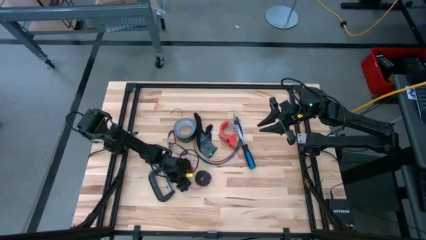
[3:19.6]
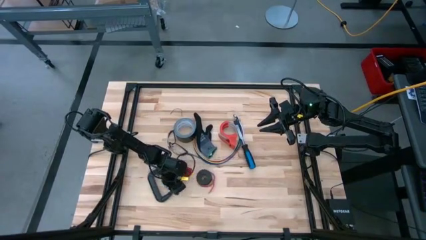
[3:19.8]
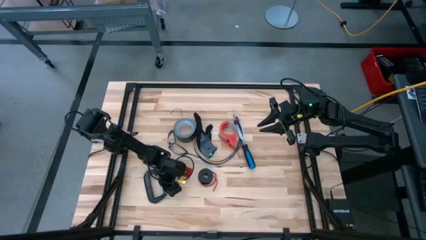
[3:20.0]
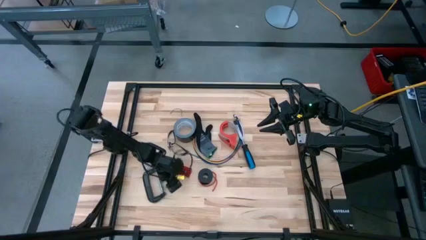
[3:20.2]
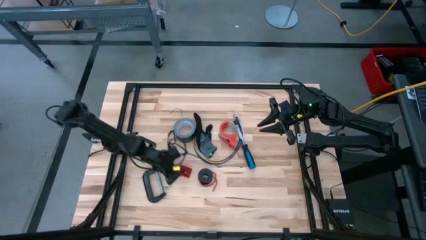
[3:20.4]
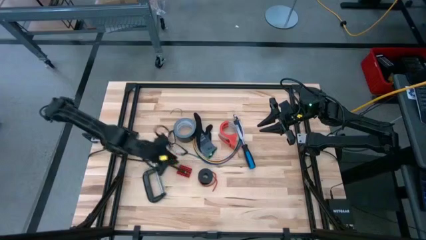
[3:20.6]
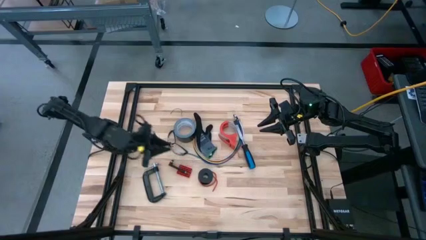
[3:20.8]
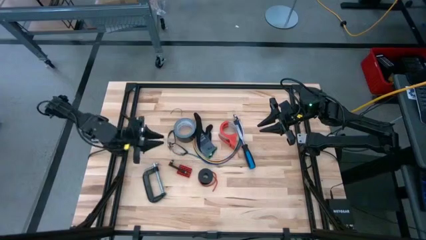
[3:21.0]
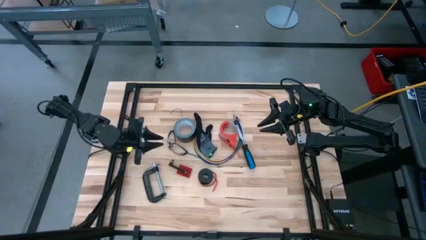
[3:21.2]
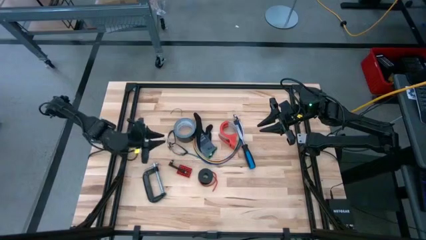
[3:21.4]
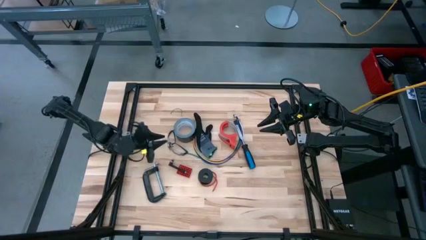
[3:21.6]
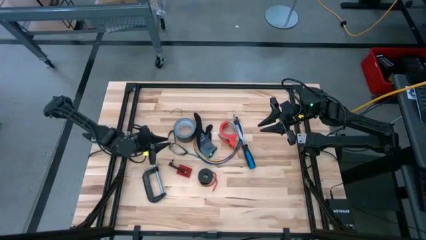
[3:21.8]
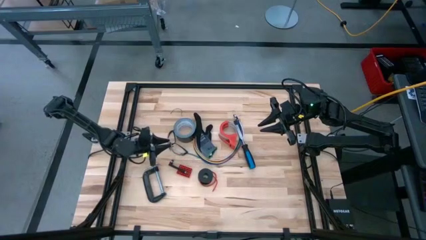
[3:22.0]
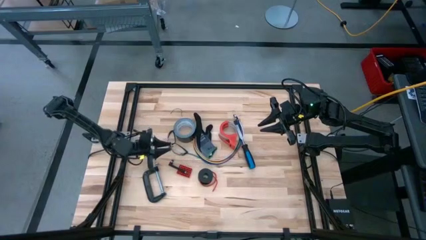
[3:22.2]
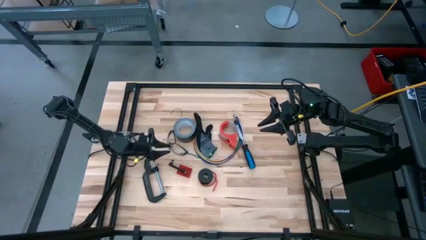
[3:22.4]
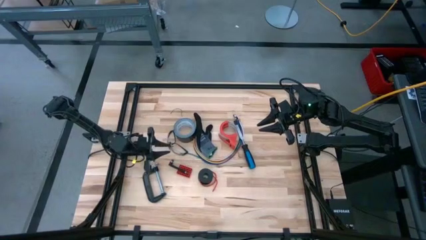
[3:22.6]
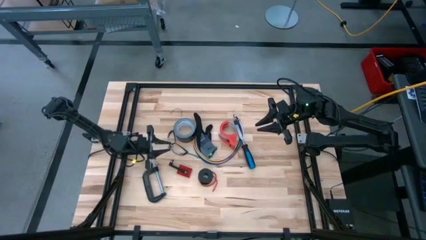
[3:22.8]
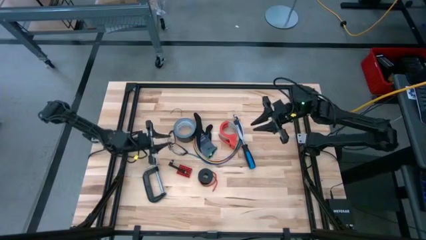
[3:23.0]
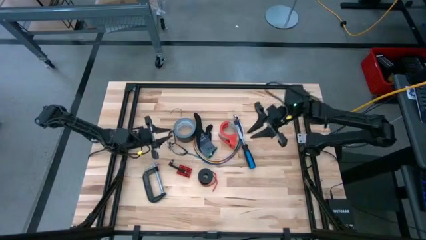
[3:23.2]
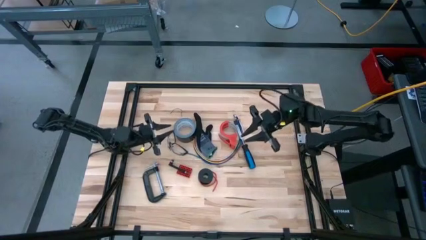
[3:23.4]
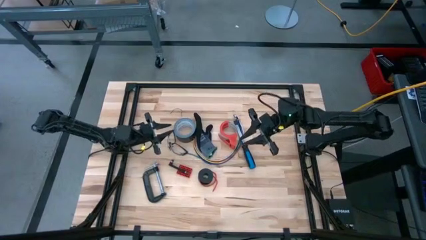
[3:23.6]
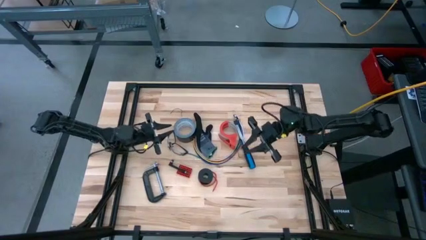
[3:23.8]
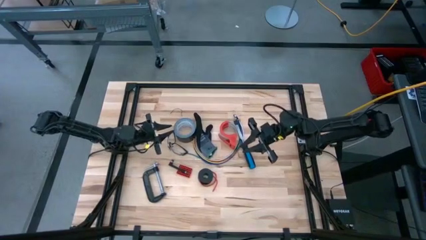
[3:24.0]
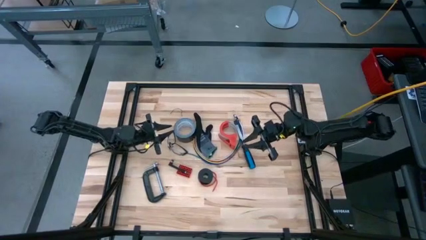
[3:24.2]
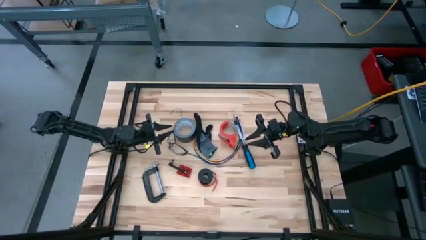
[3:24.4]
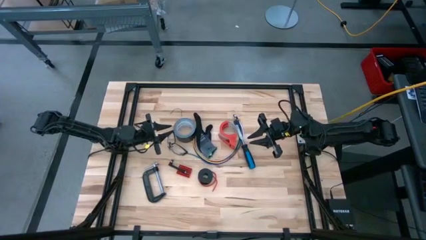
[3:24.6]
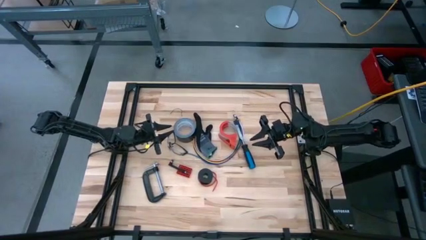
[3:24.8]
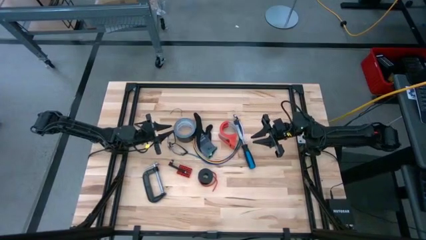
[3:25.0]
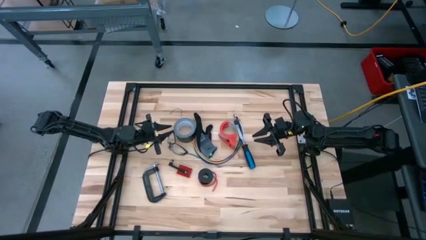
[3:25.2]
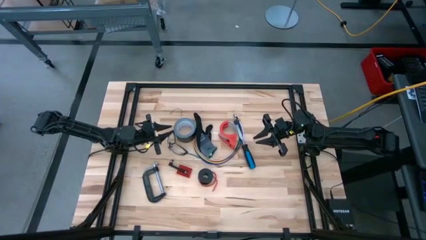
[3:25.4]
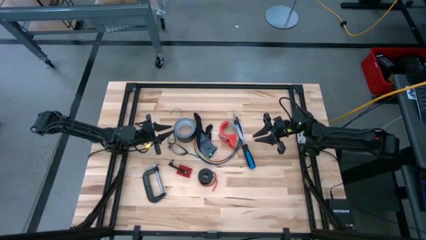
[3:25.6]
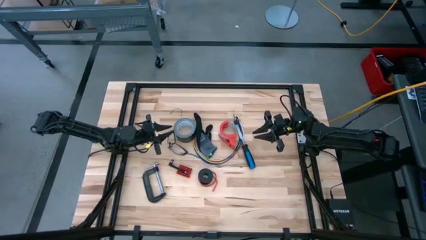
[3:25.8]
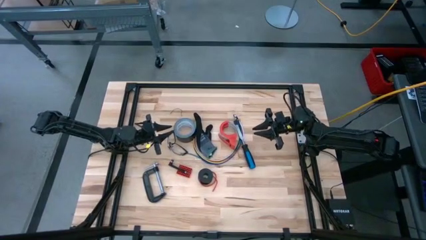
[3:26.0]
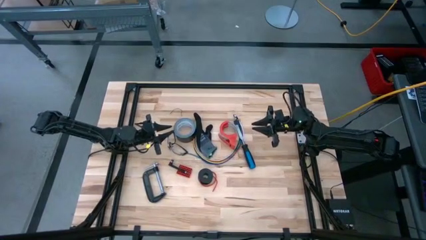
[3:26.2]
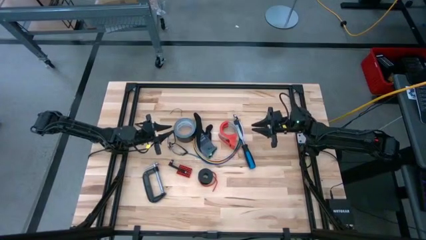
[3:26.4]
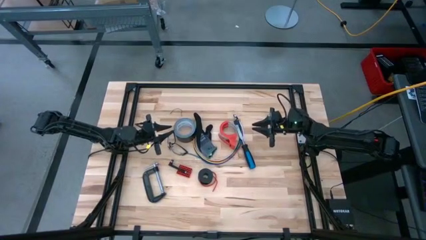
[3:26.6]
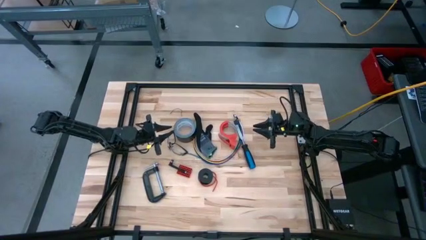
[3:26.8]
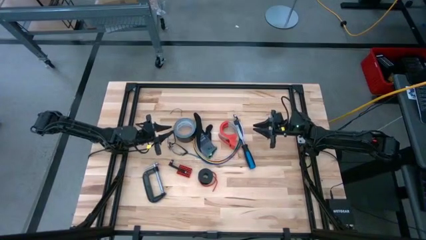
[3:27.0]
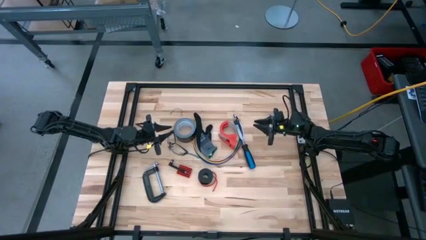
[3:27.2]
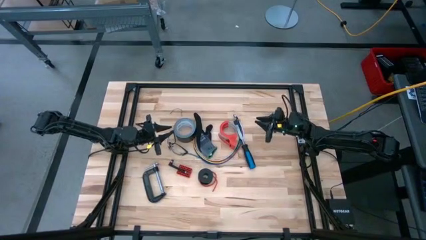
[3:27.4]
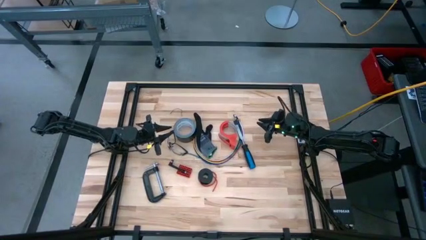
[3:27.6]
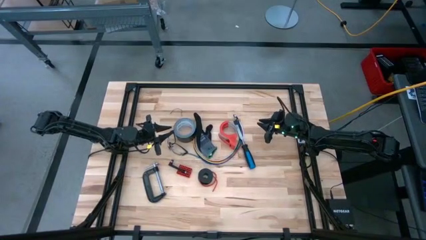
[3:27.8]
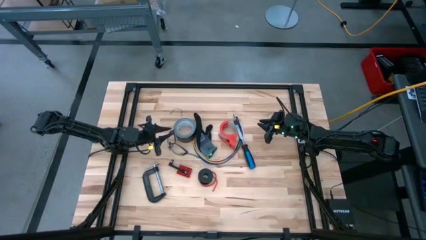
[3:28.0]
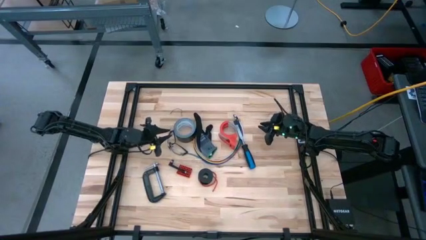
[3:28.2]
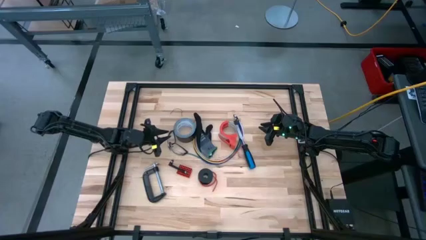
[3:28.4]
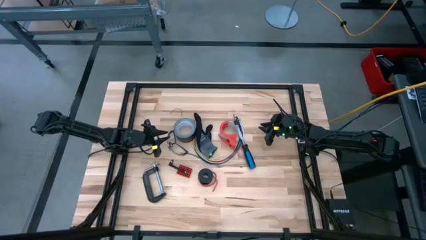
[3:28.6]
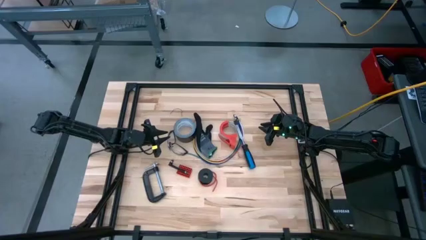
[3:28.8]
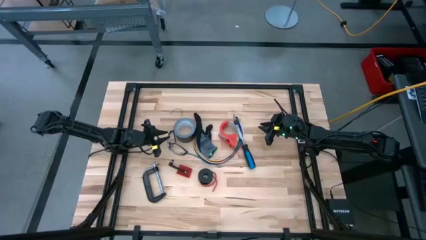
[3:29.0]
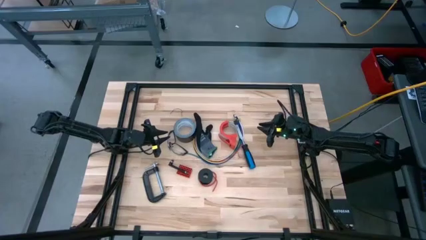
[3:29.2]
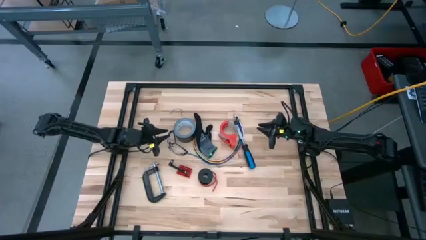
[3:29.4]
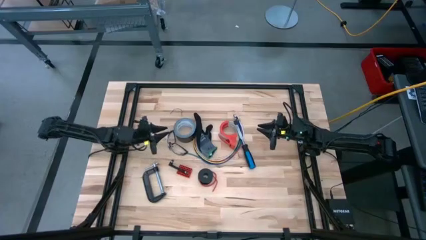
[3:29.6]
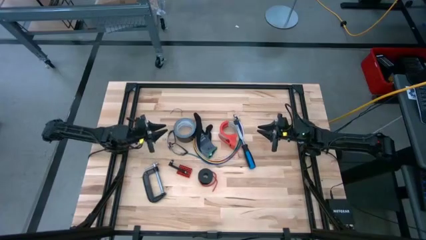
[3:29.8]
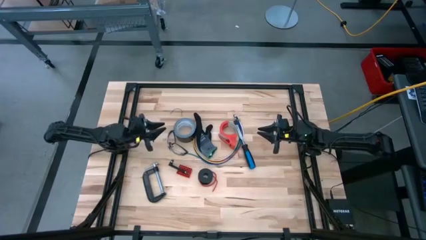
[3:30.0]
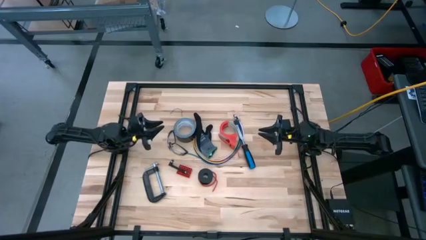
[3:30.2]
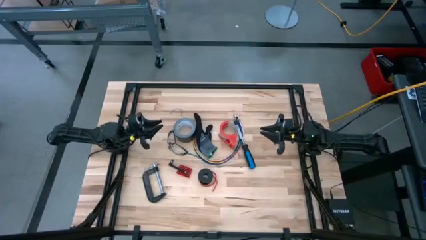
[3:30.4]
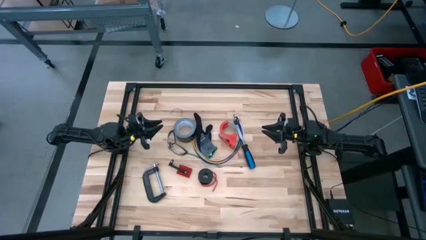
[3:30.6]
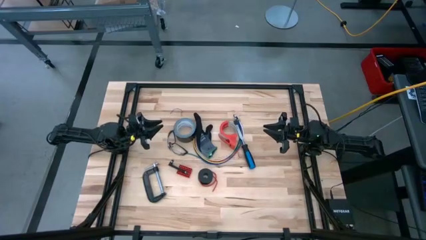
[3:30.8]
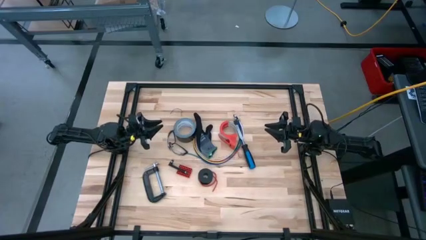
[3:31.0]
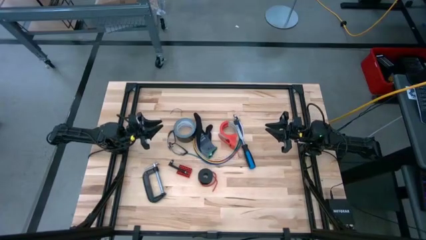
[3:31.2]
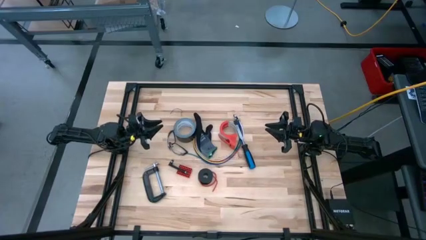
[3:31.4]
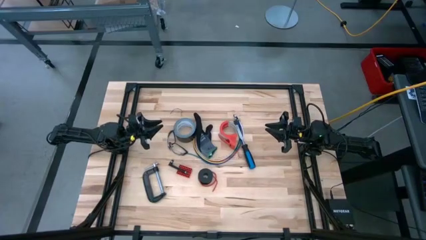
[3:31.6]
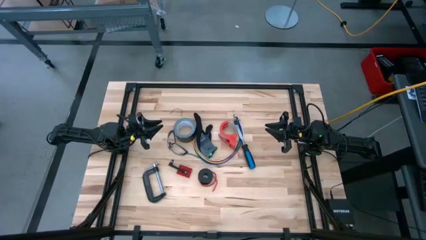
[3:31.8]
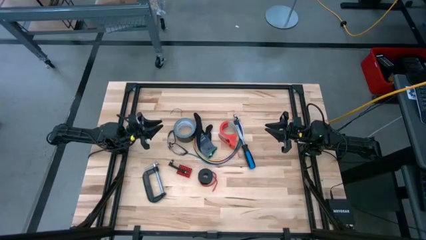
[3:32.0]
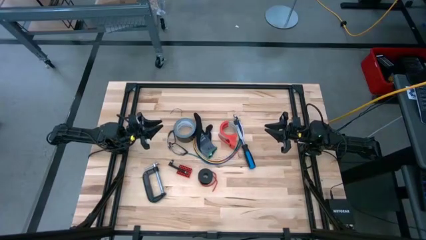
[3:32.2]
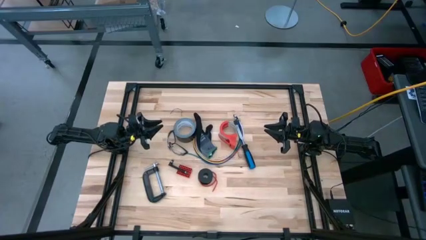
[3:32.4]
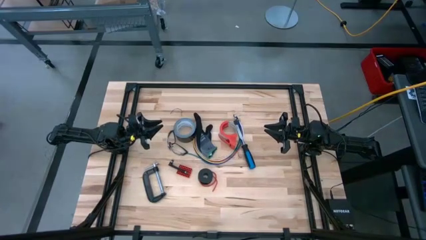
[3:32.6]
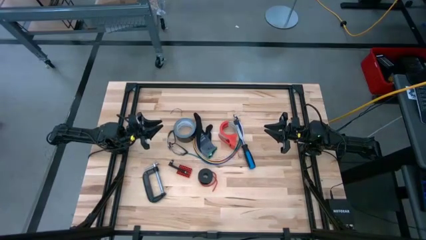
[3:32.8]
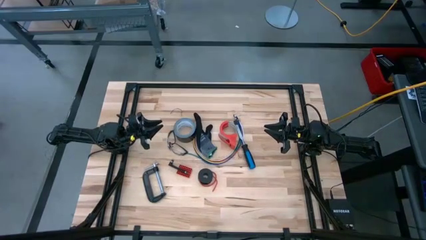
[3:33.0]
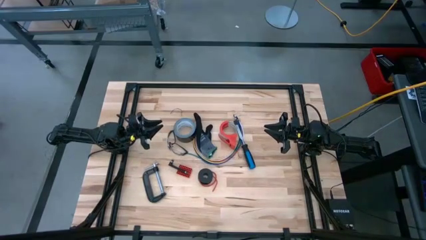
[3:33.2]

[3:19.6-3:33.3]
Task: Coil cords
Return to Home Position

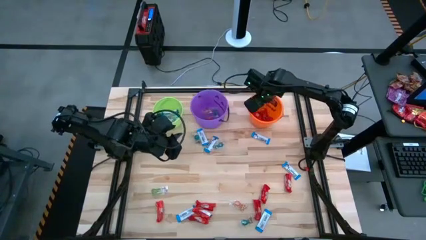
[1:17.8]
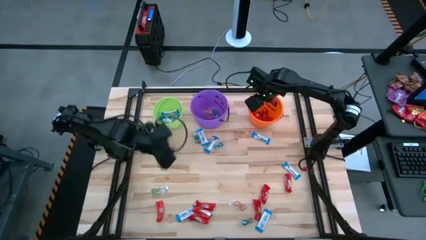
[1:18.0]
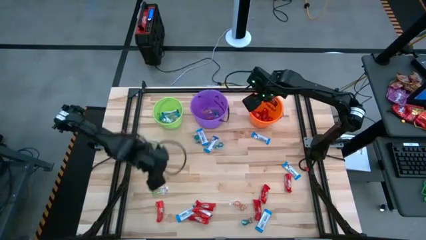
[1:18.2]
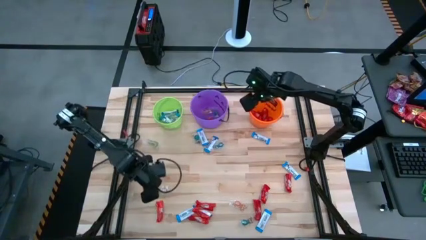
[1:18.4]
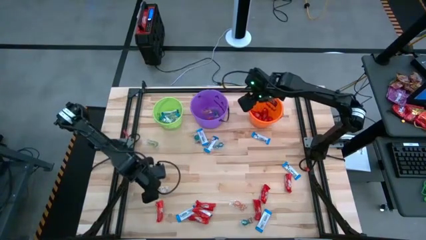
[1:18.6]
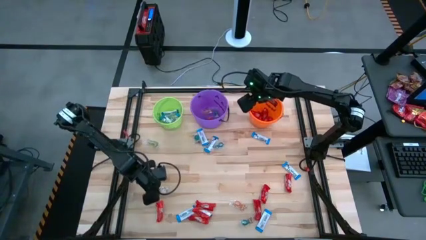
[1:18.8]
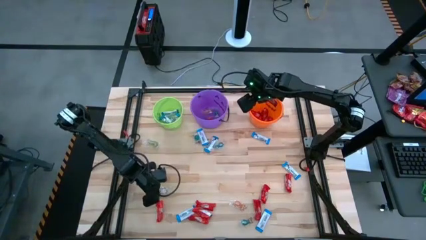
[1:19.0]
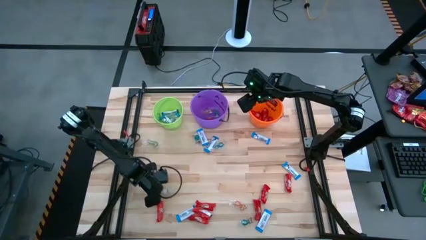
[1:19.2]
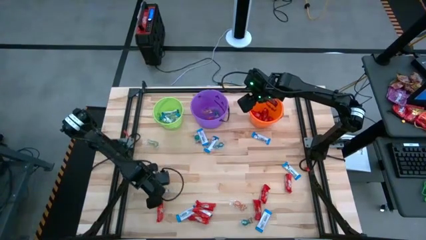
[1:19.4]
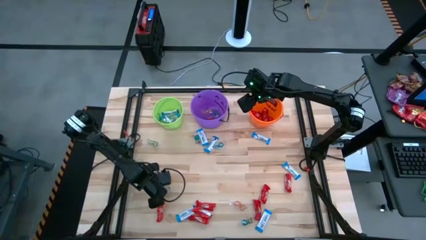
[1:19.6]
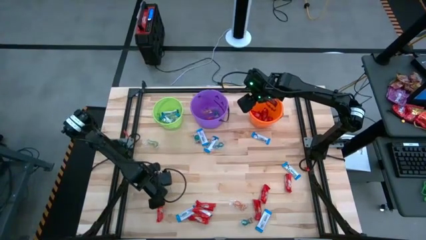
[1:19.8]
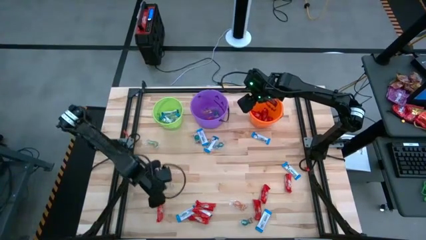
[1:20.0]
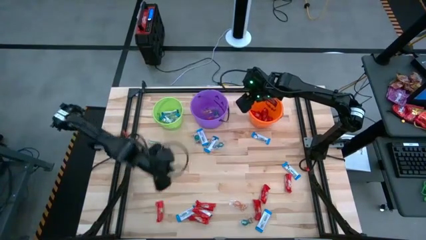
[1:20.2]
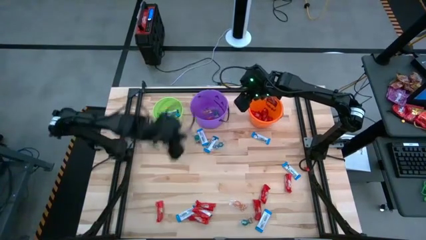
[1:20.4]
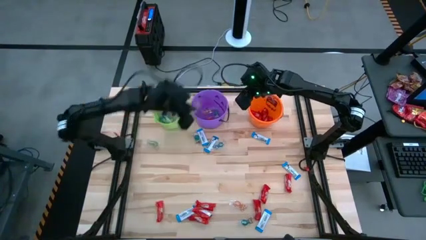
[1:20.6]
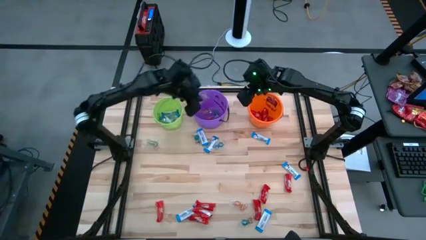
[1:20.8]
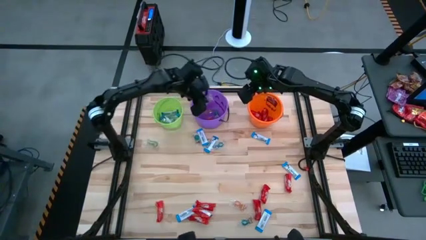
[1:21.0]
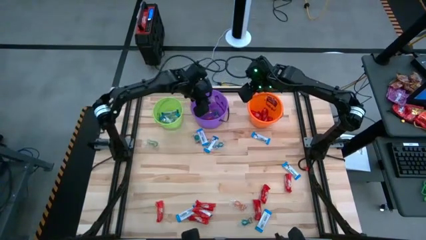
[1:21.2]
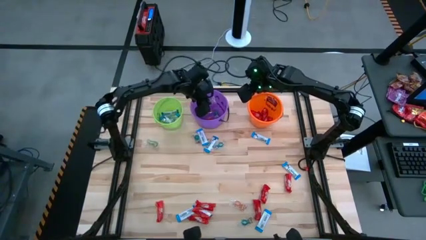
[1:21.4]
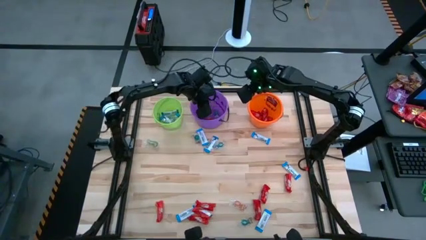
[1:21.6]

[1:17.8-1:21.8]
Task: Sort candy by brand, put in halloween buckets
Put the green gummy into the purple bucket
